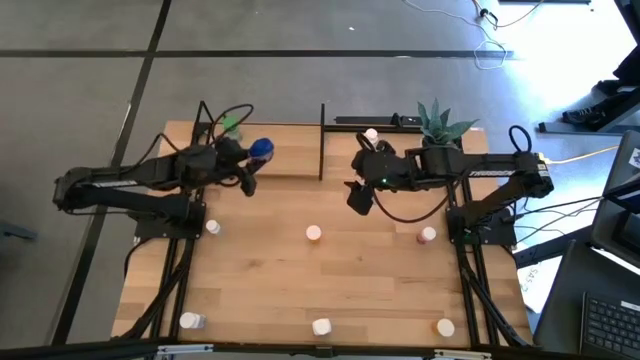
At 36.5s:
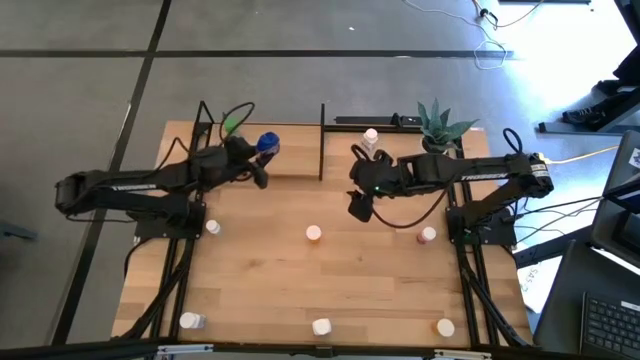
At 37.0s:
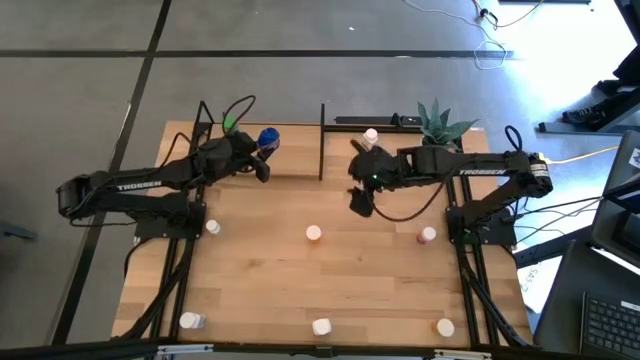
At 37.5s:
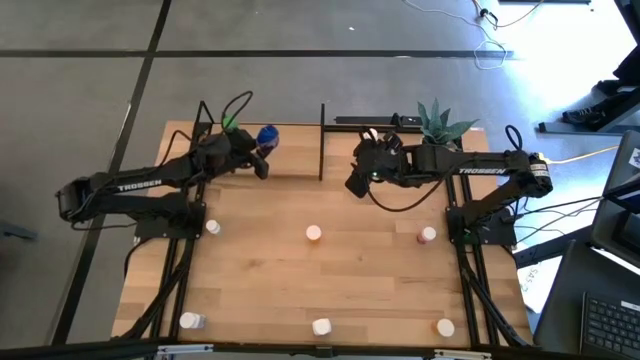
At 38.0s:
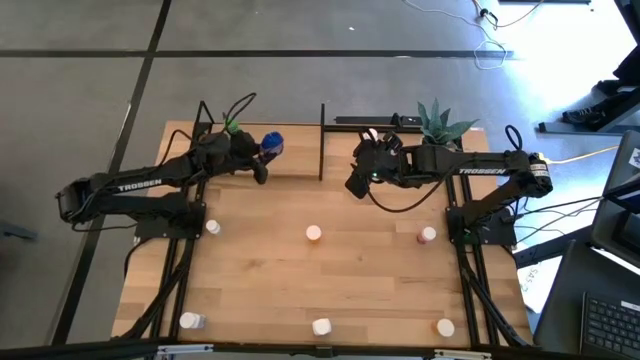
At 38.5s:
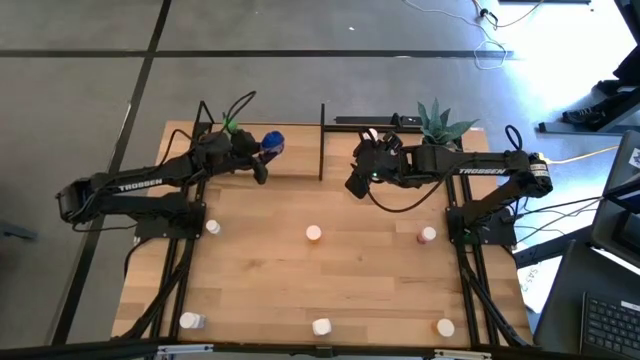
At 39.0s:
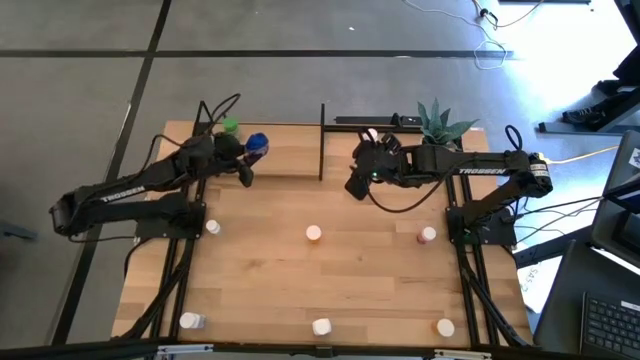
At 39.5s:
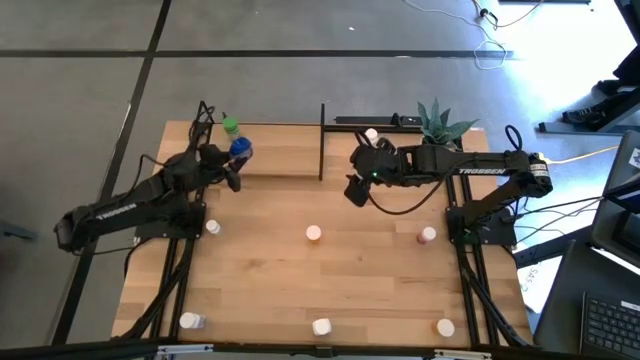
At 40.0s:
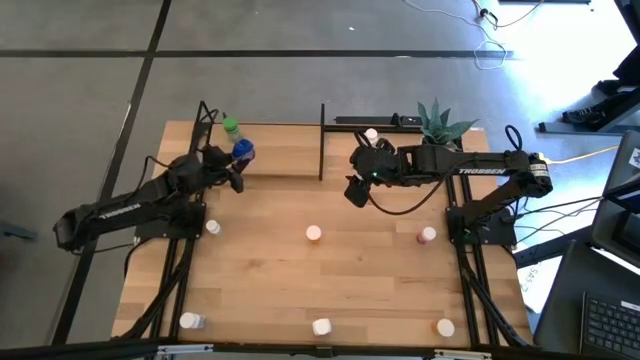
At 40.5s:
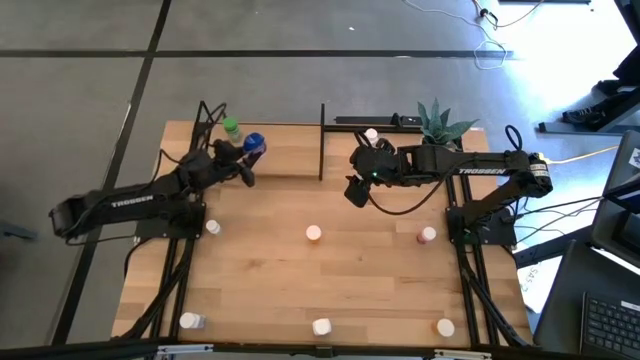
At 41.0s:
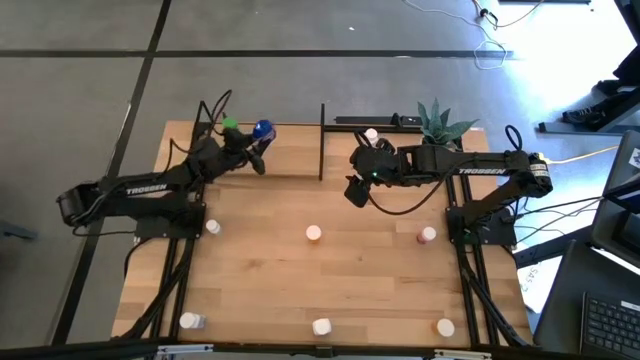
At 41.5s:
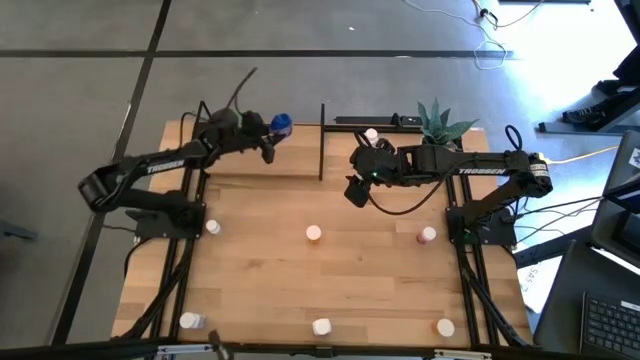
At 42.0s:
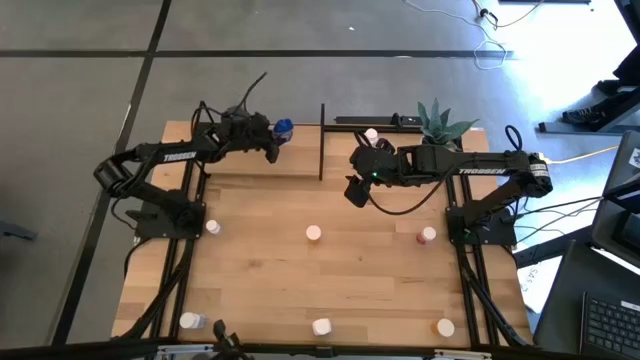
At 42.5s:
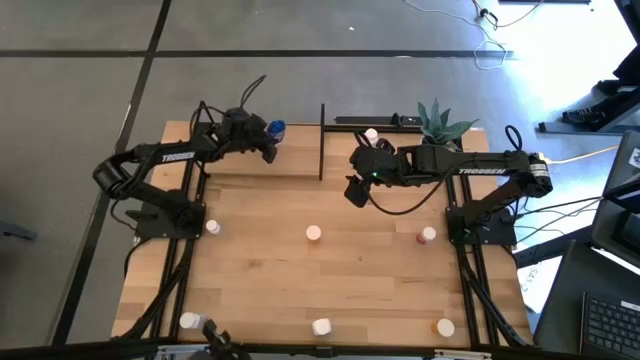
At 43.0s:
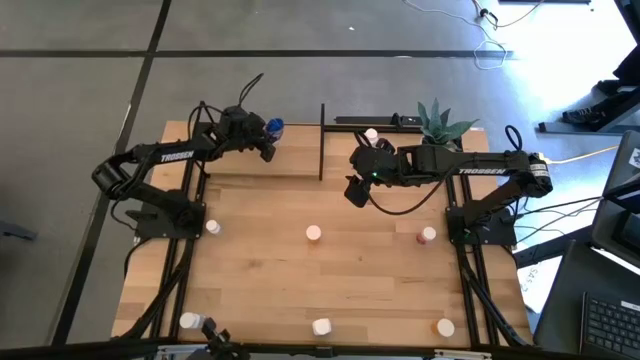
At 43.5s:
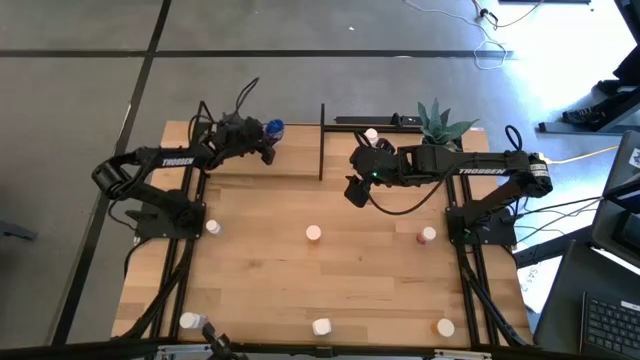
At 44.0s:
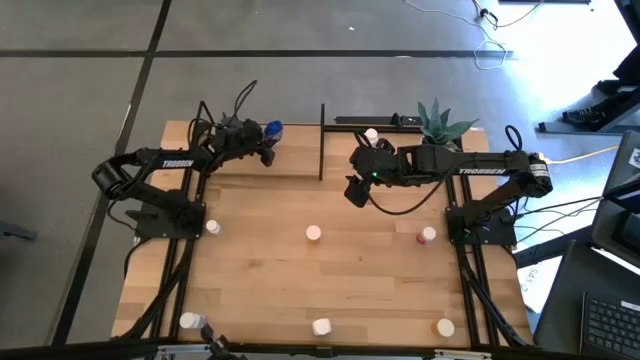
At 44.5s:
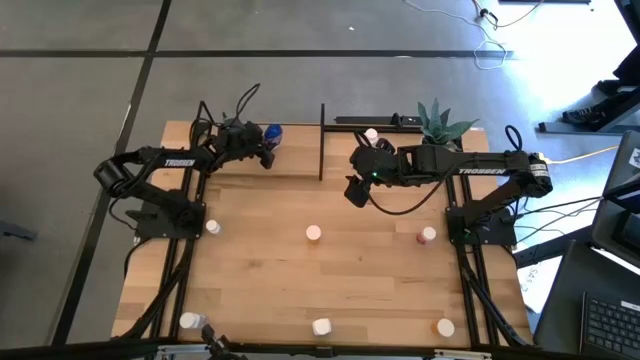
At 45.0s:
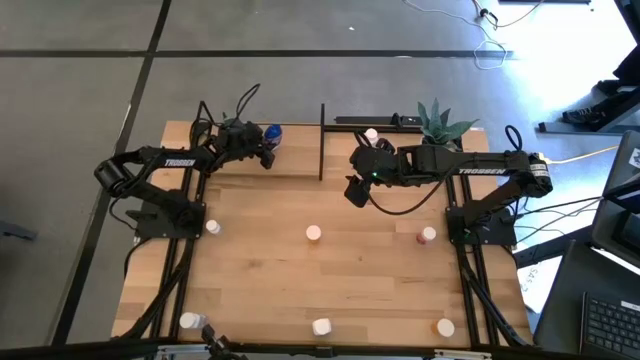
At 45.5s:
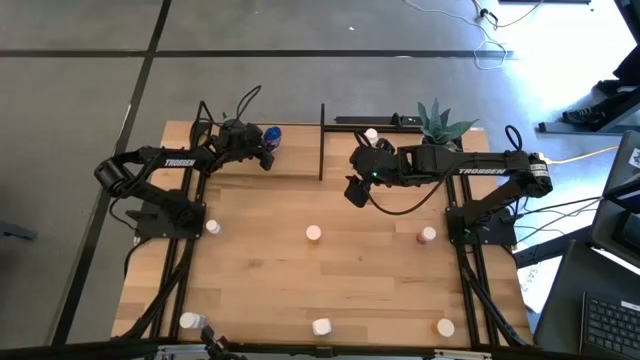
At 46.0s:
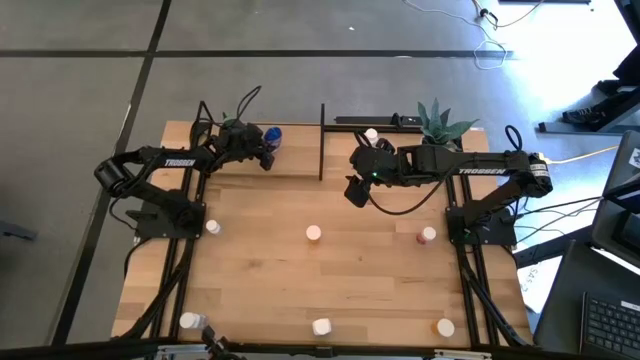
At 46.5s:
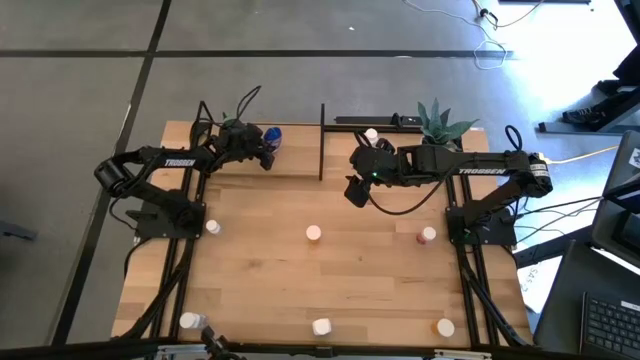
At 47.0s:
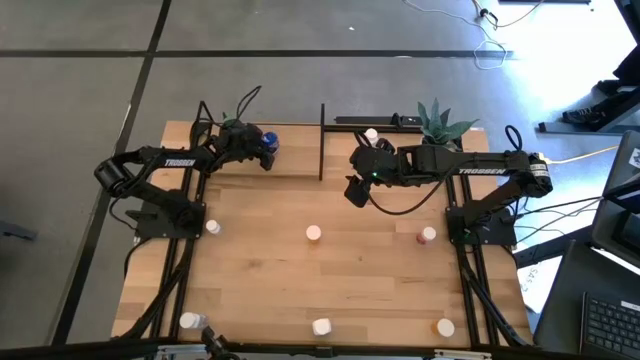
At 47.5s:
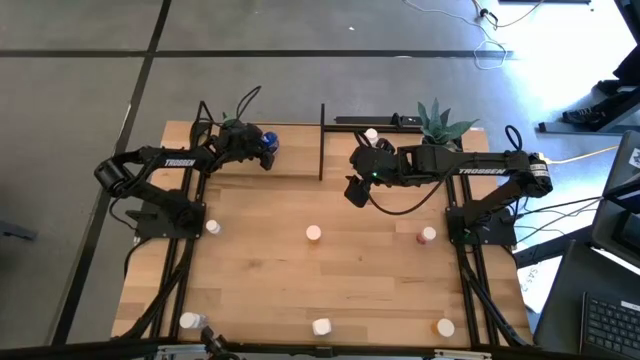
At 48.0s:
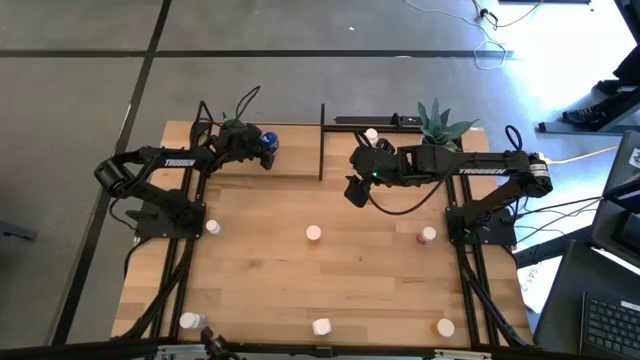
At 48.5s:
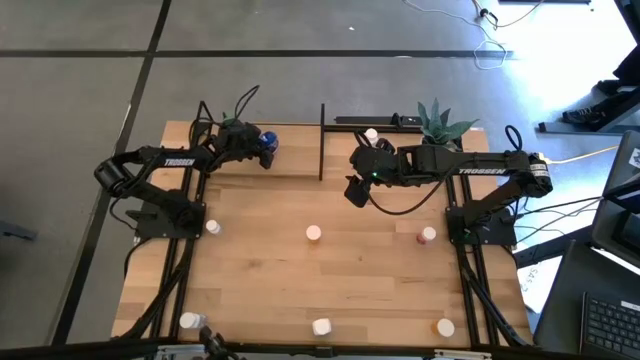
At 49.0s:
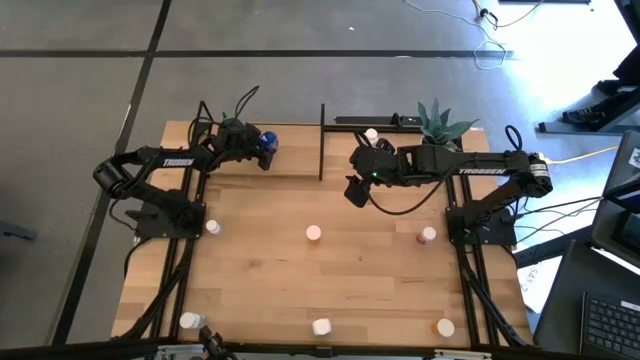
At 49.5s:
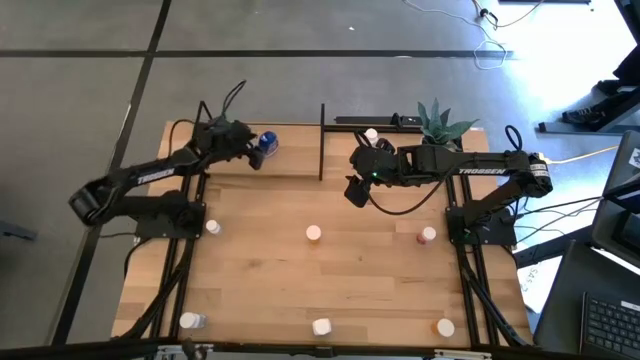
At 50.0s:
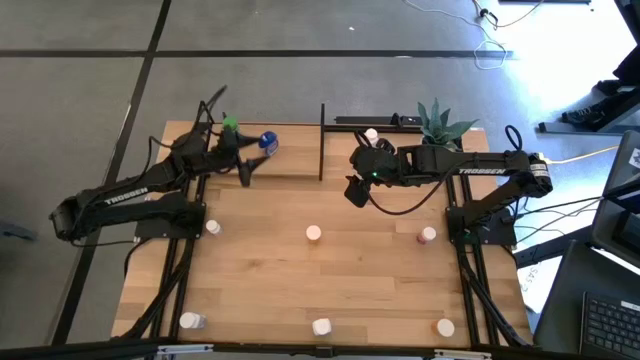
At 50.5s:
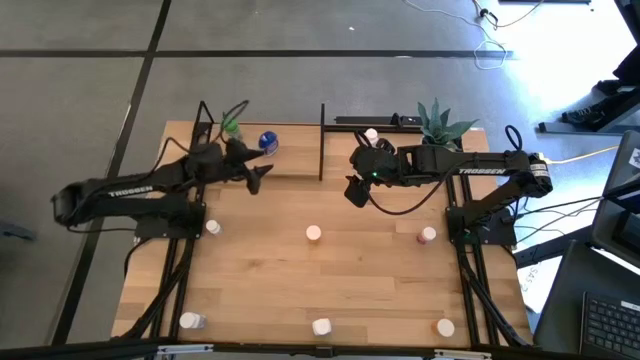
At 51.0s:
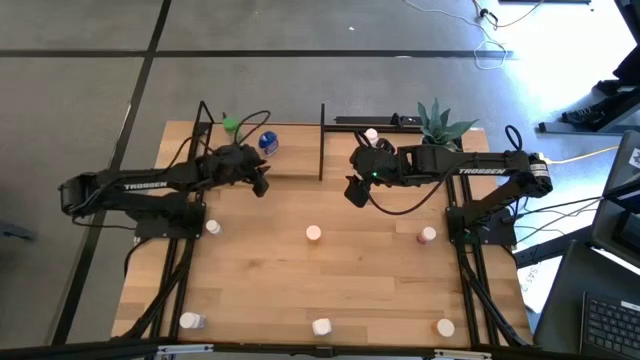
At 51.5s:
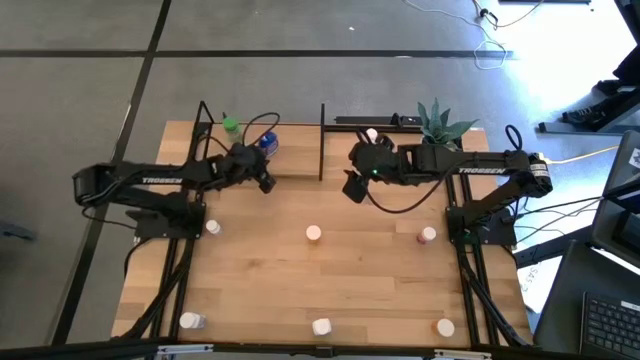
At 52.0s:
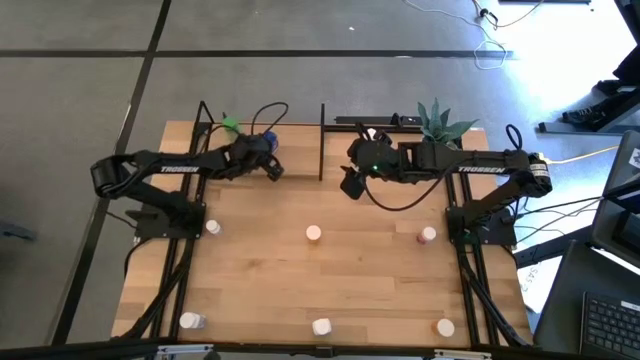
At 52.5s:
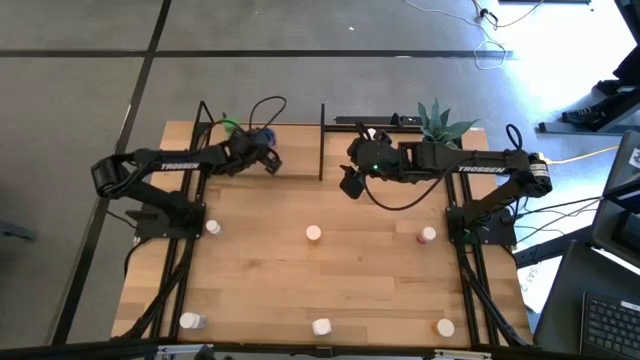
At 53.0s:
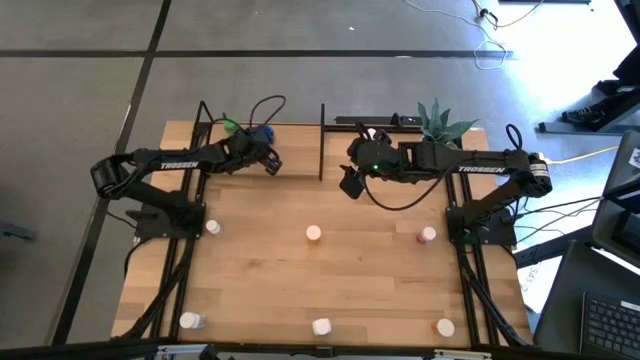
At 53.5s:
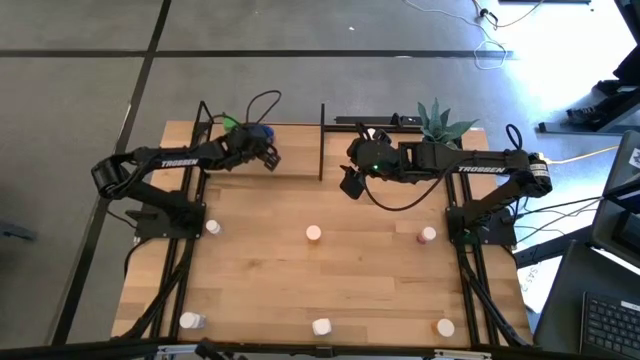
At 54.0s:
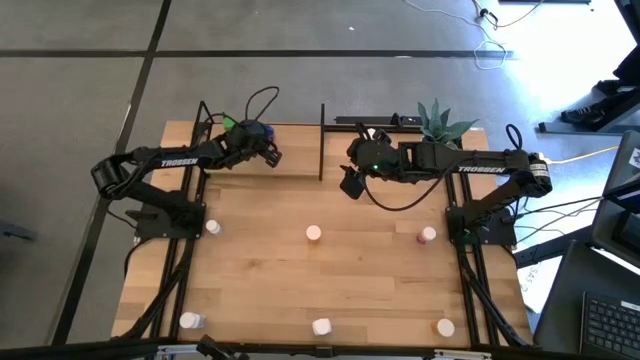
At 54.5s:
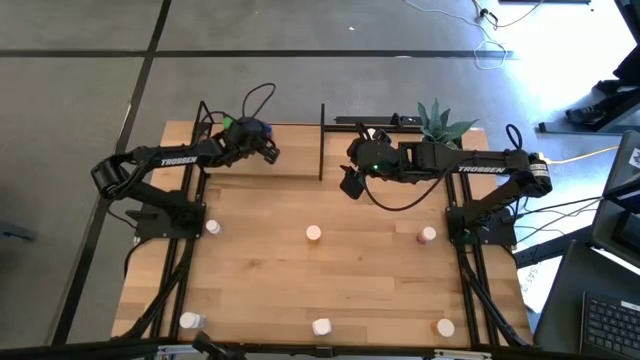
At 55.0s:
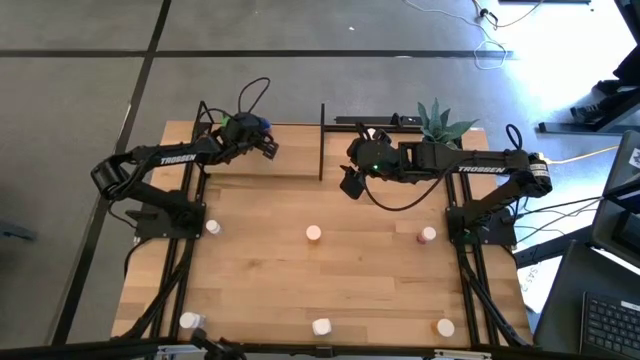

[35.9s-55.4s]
Task: Pick and place medicine bottles onto shelf by color
Put the blue pill bottle on the shelf
